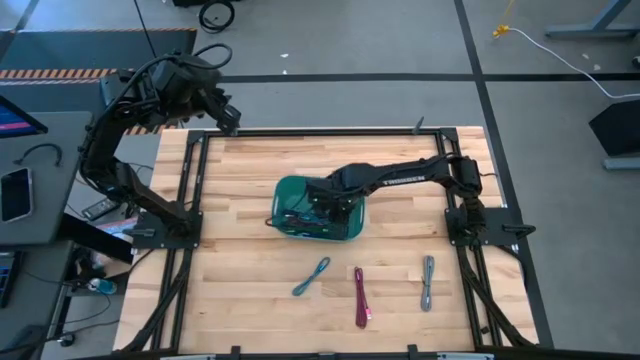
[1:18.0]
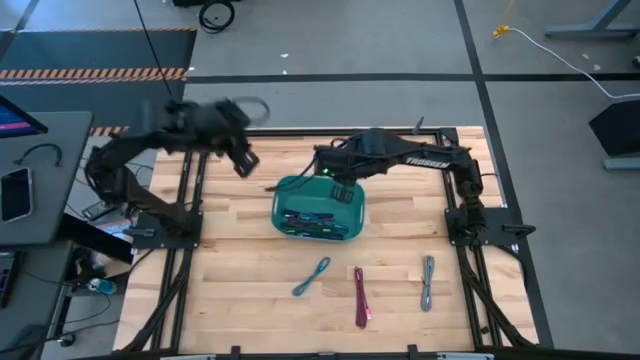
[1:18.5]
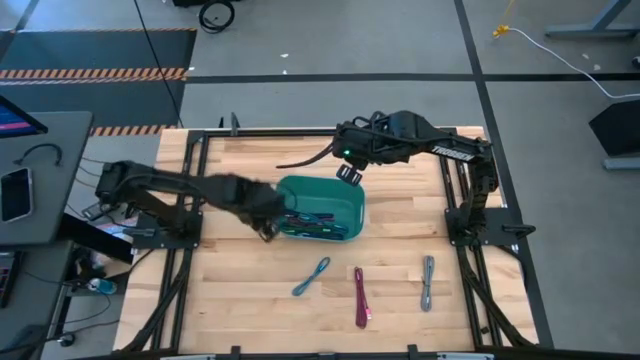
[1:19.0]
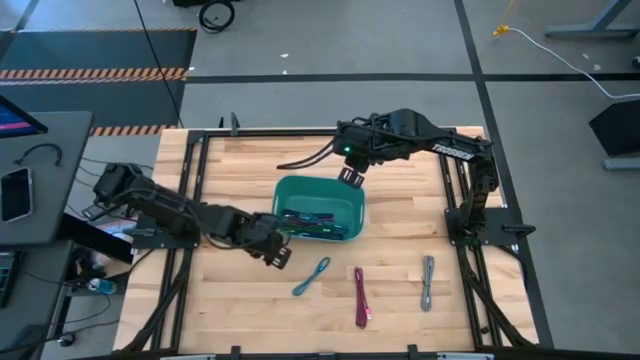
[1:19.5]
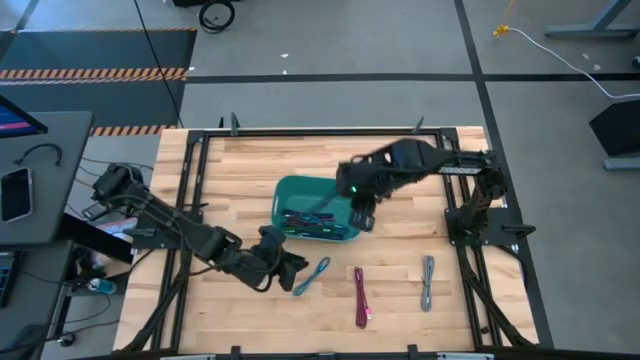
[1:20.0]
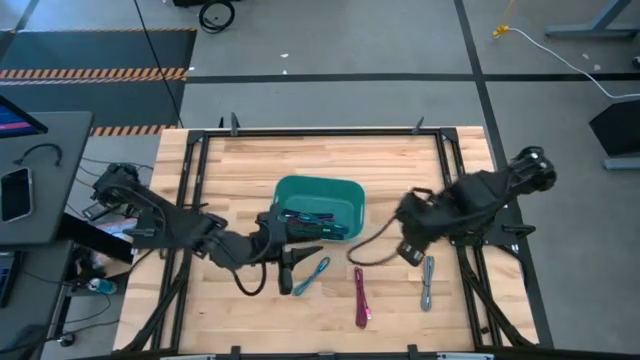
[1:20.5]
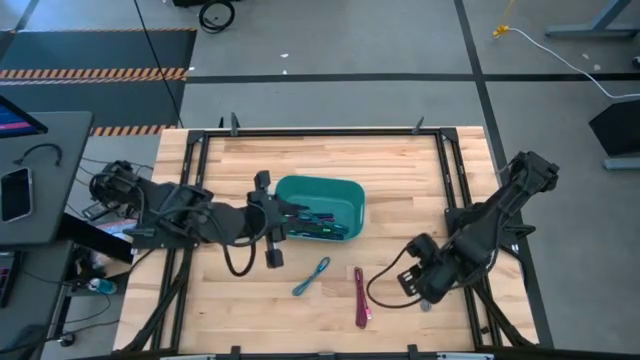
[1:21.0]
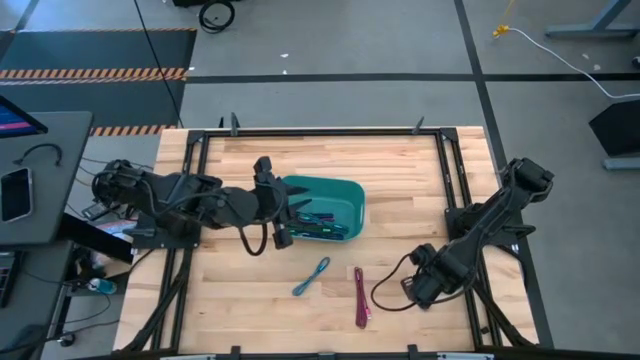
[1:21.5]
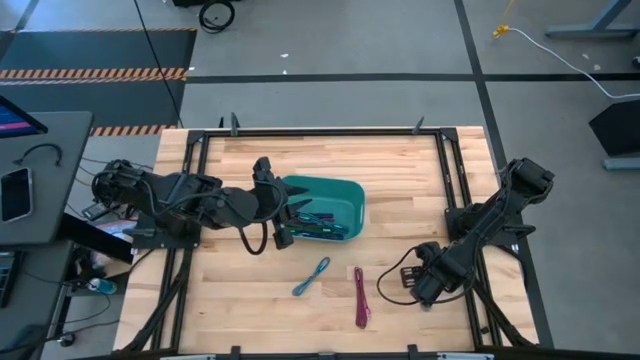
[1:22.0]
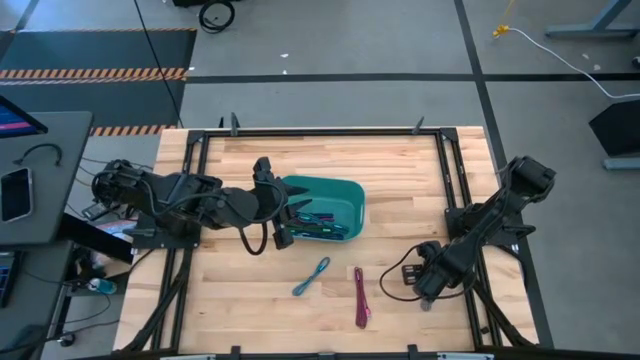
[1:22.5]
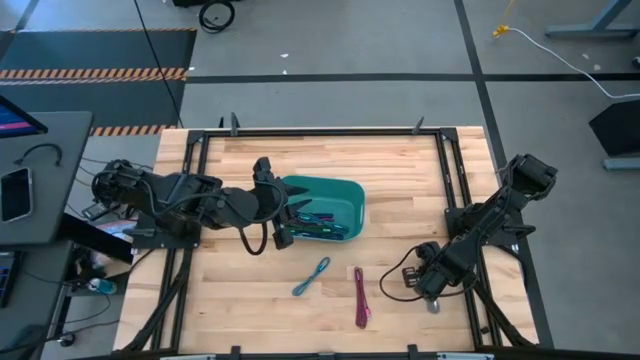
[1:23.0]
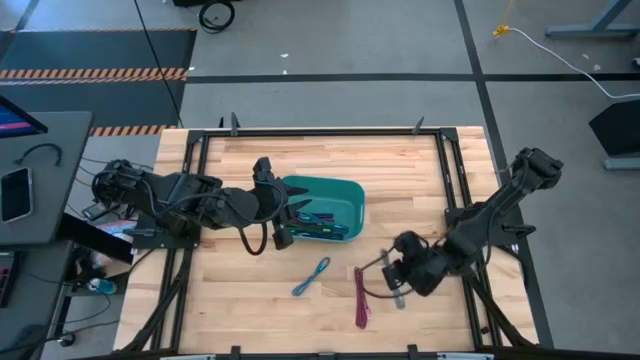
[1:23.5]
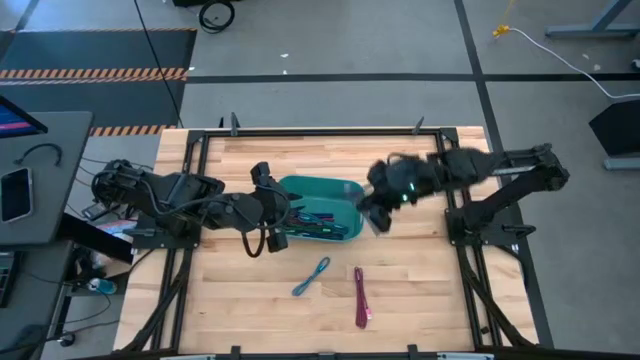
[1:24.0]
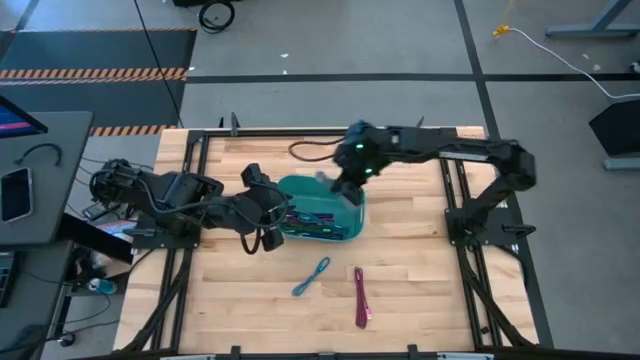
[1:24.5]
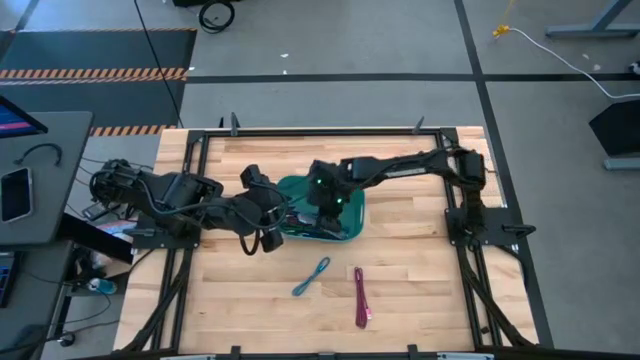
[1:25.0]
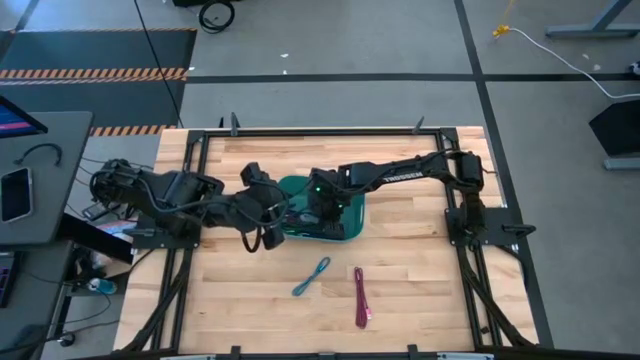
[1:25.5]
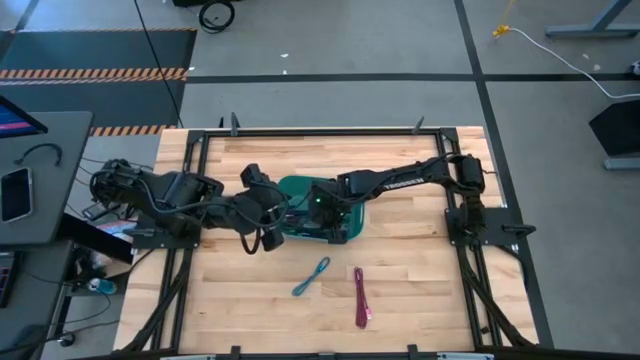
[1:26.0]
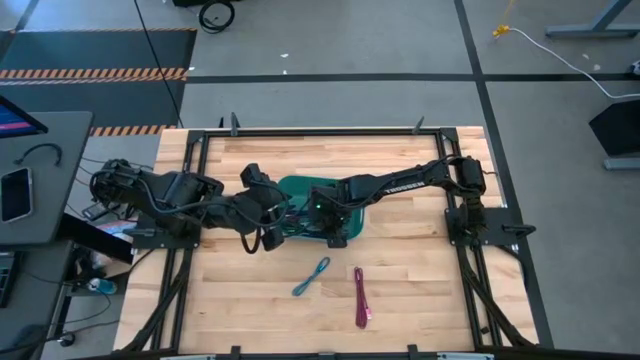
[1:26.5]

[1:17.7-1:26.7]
Task: Pick and place USB-C Cables
Put the white charger cable into the green bin

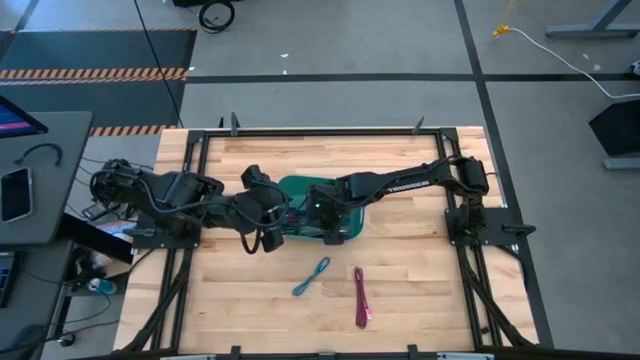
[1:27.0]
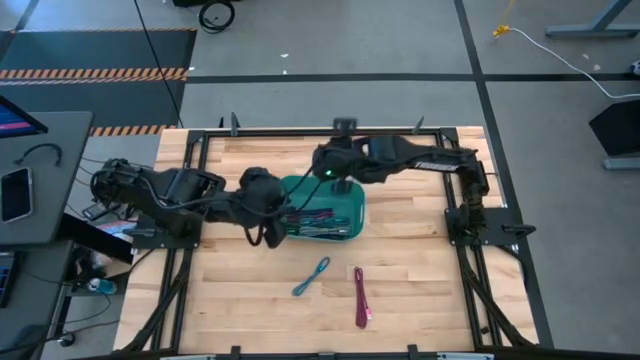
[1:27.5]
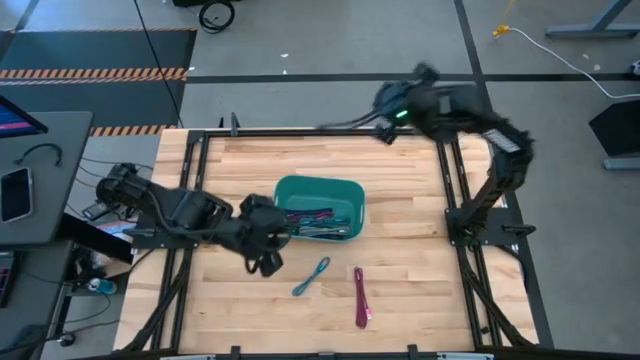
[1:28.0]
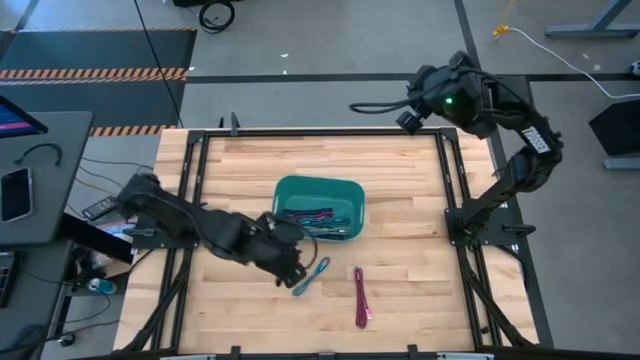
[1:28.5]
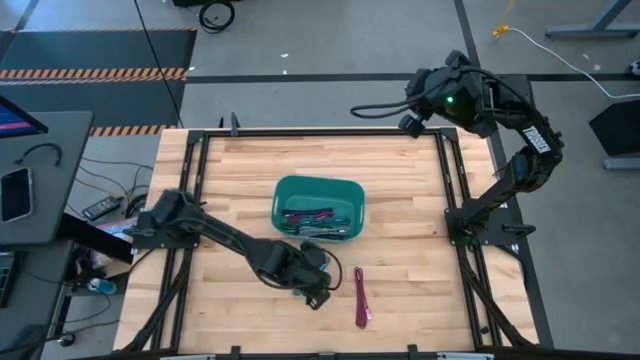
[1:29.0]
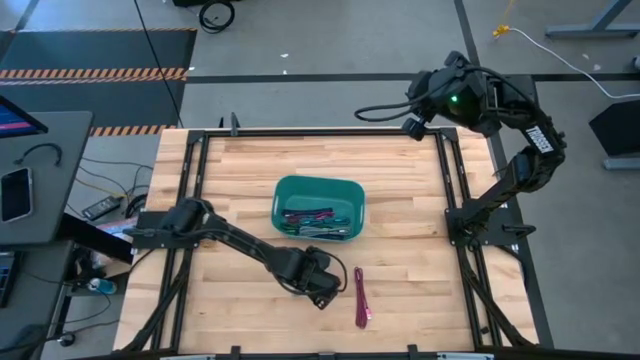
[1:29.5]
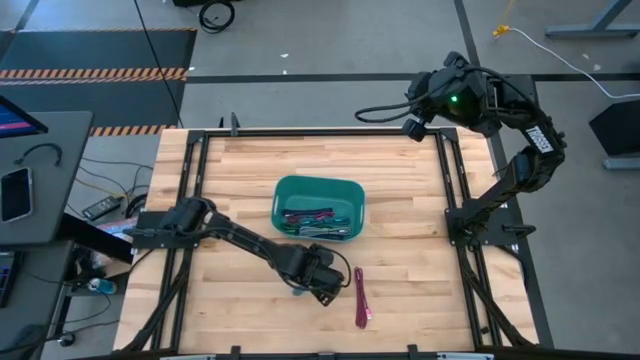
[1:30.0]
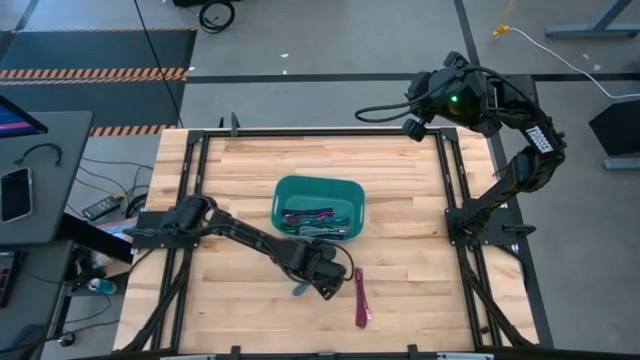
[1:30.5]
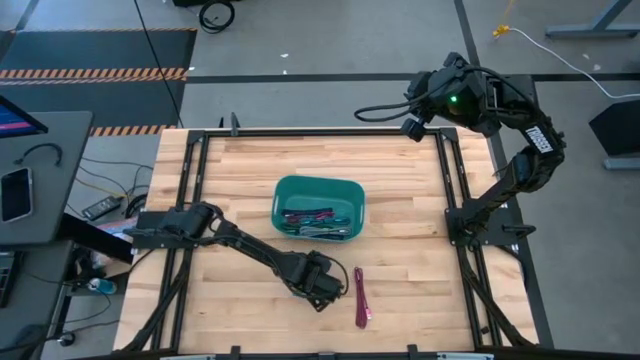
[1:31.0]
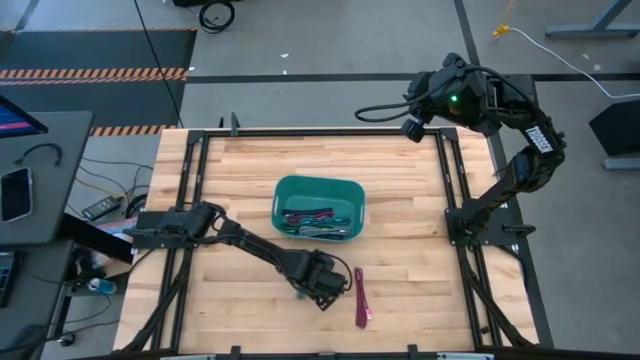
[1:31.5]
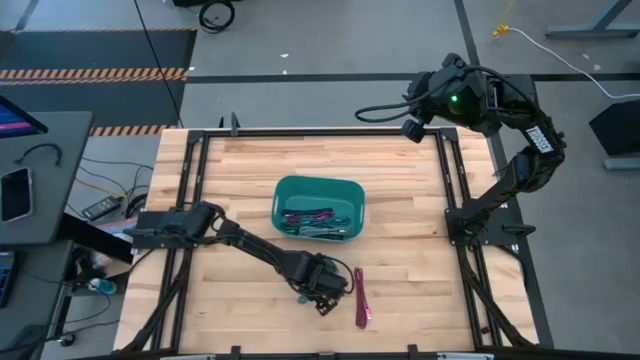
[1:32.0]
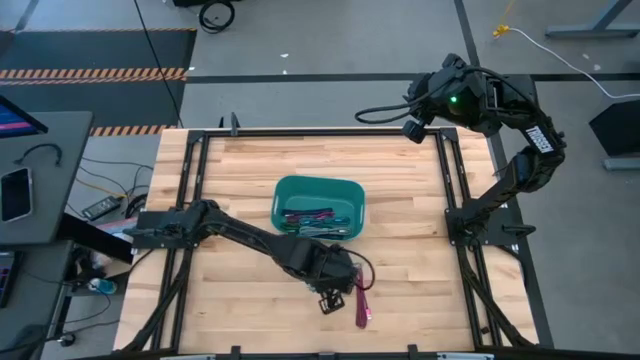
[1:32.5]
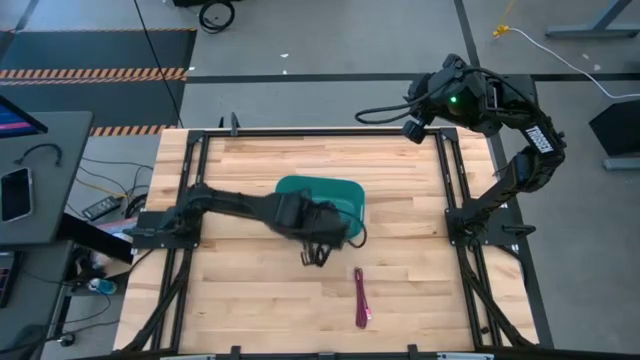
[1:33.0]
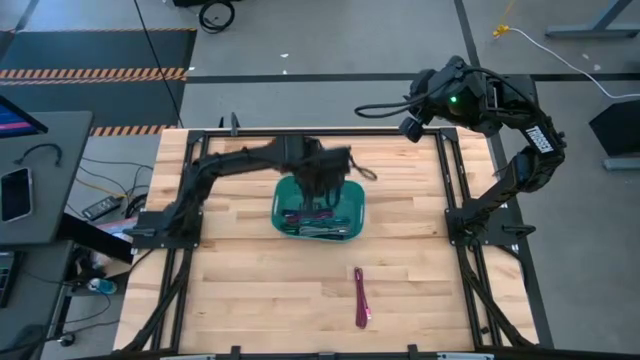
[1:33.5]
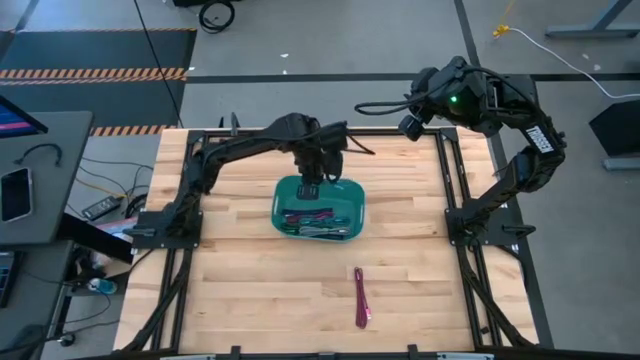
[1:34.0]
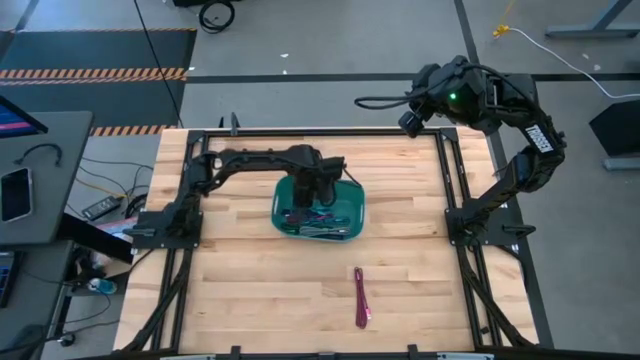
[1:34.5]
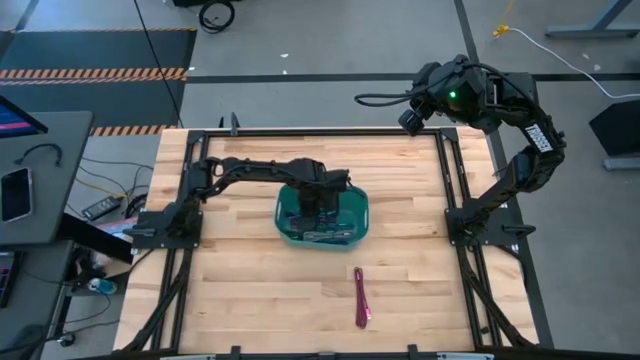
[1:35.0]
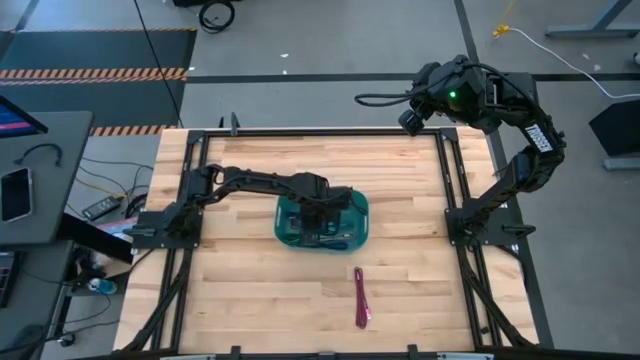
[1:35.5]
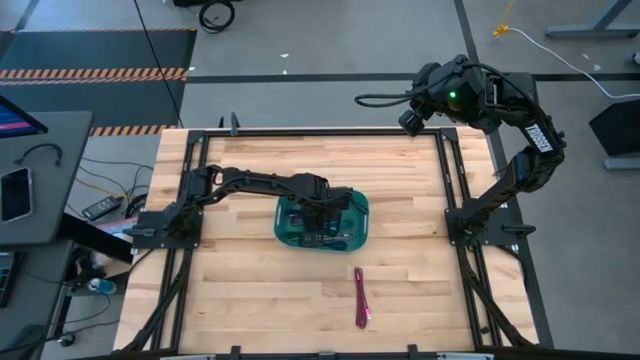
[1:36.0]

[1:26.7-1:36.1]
Put the light blue charger cable into the green bin

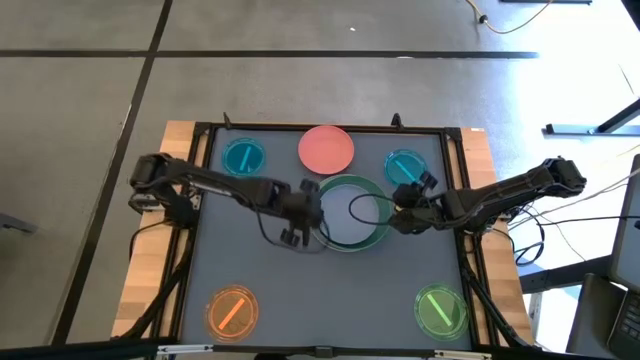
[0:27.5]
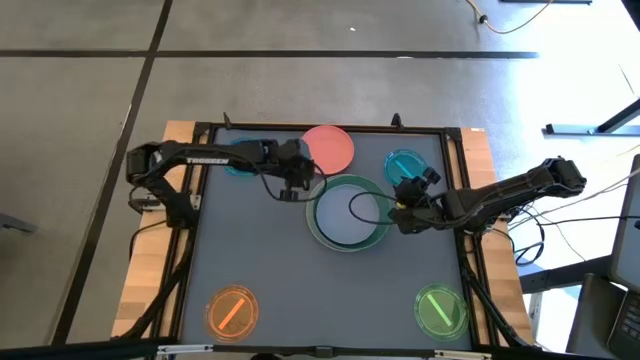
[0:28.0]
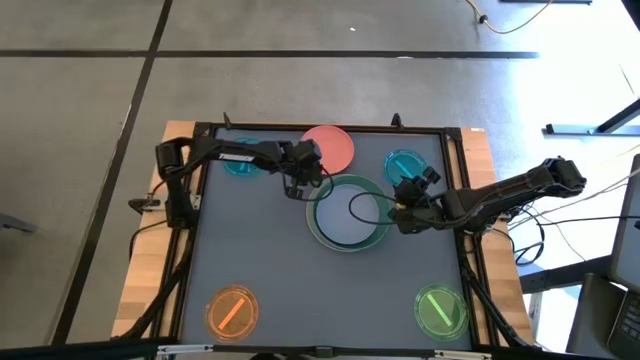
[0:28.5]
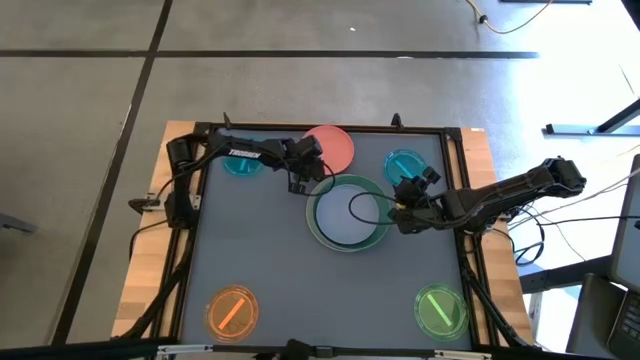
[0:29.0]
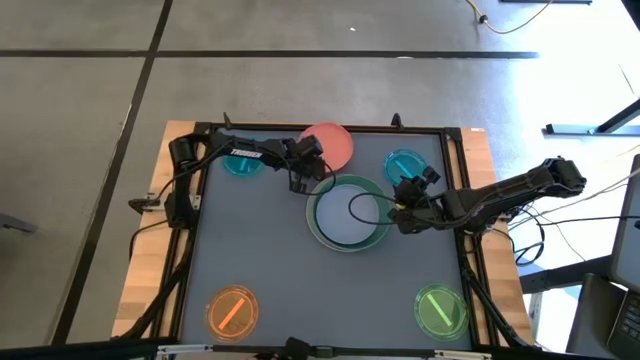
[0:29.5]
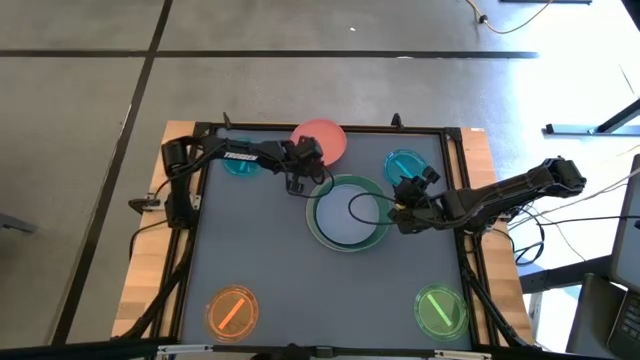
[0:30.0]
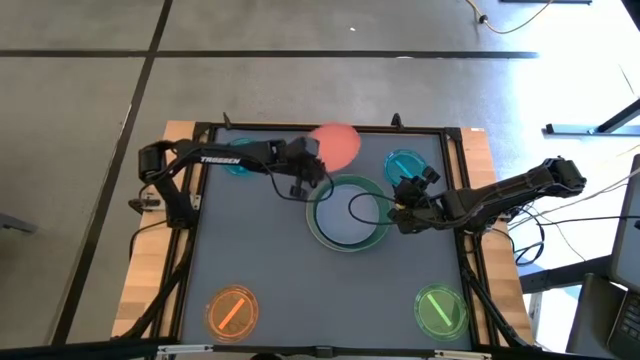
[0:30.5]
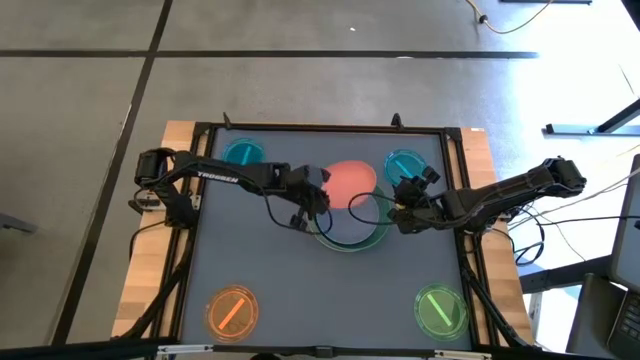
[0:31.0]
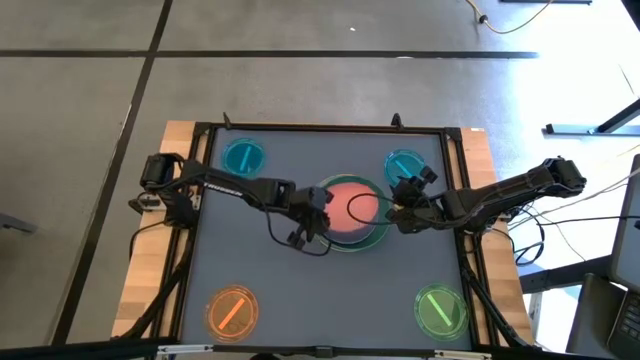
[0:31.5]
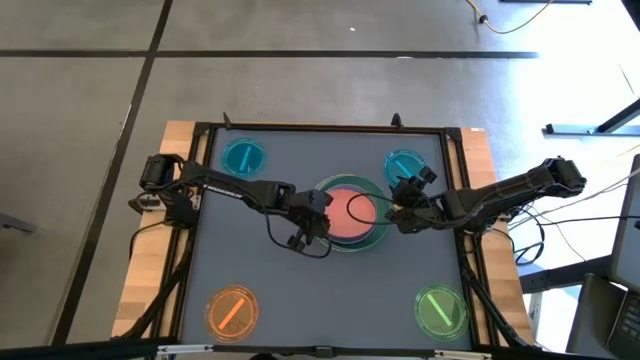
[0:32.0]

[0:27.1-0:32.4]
Task: Stack plastic plates
Stack the pink plate on top of the blue plate
